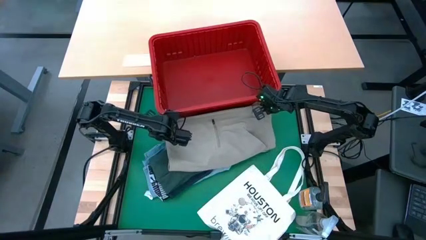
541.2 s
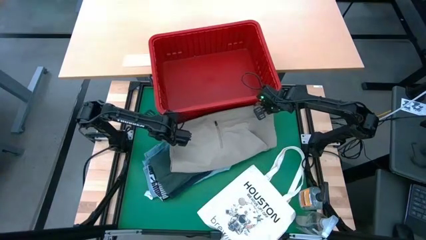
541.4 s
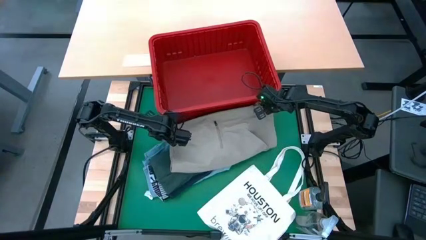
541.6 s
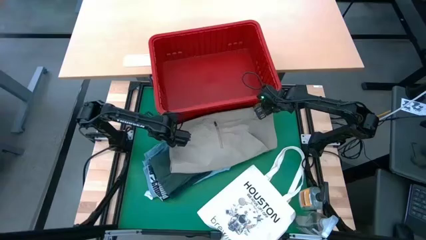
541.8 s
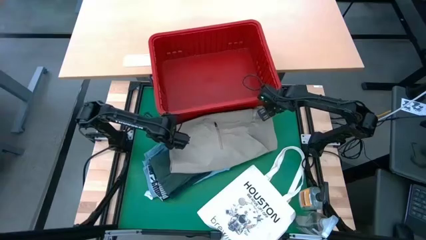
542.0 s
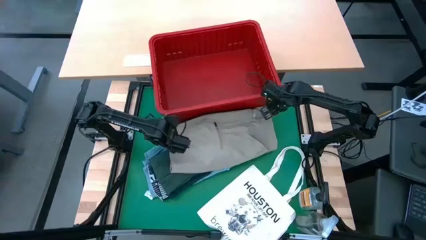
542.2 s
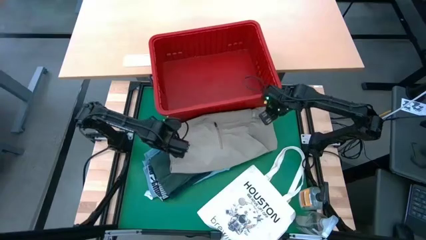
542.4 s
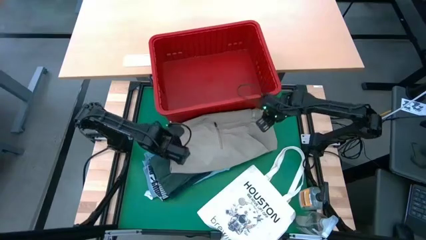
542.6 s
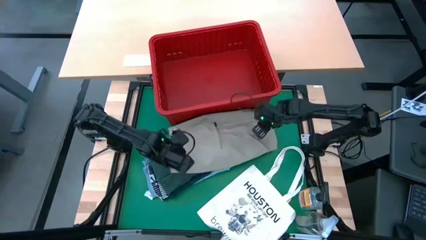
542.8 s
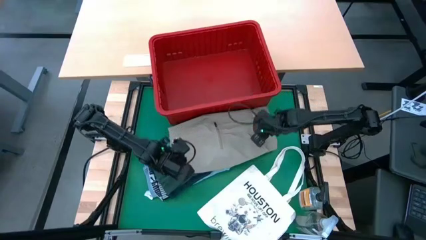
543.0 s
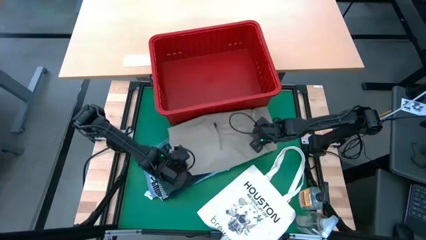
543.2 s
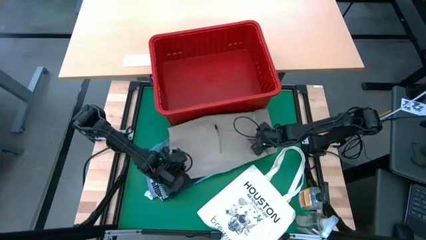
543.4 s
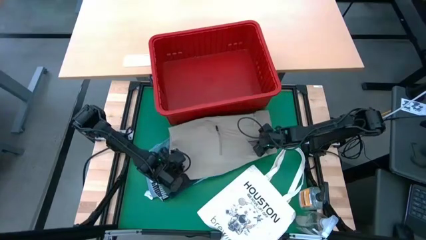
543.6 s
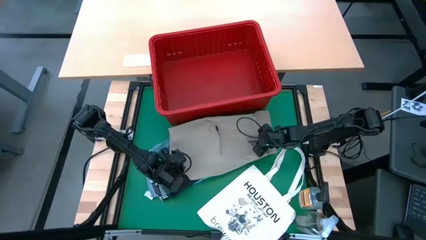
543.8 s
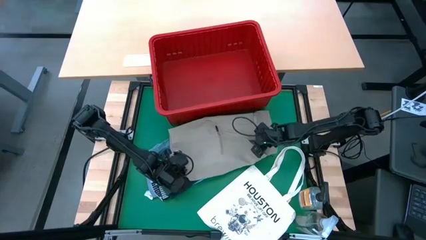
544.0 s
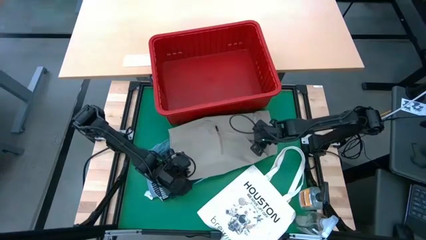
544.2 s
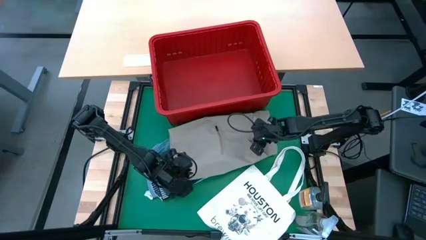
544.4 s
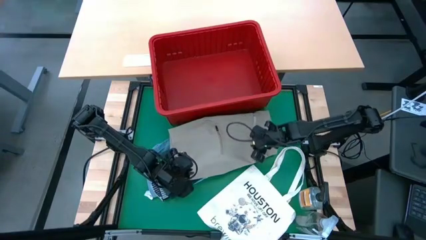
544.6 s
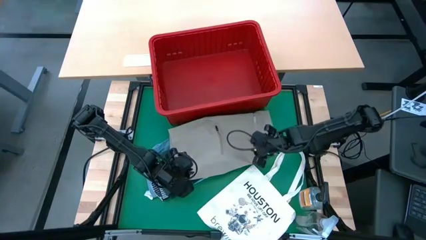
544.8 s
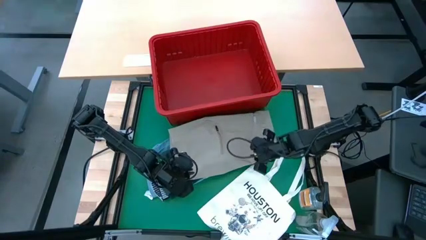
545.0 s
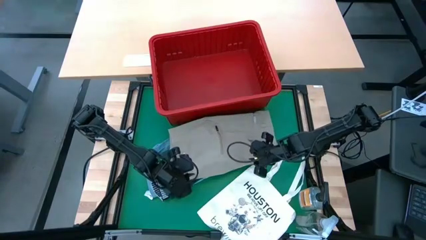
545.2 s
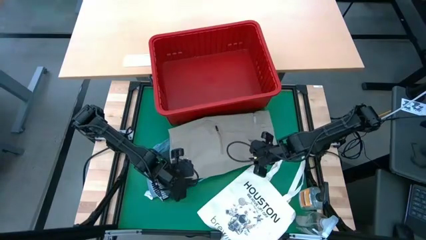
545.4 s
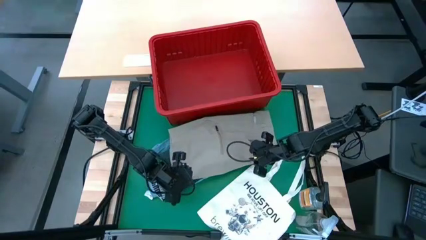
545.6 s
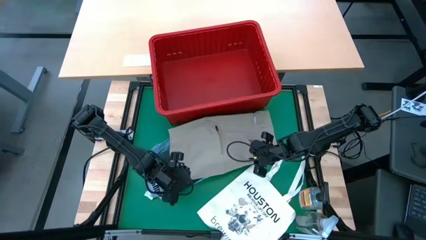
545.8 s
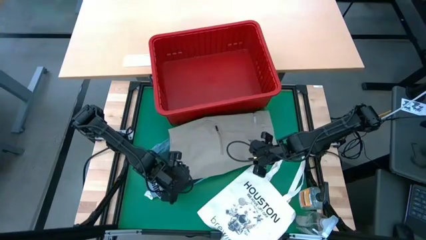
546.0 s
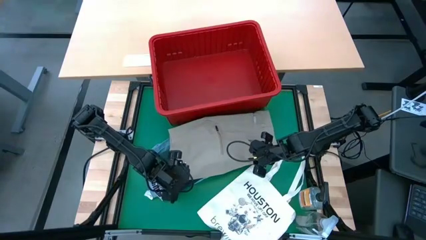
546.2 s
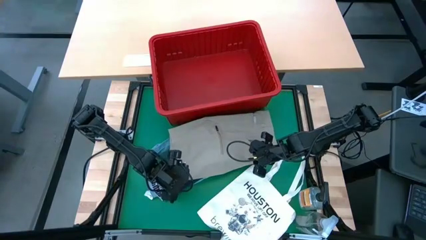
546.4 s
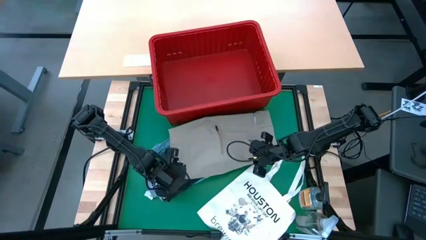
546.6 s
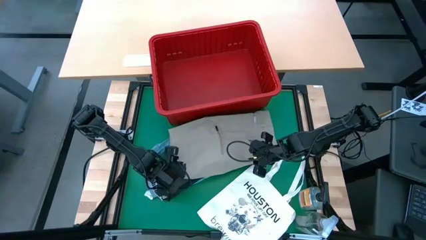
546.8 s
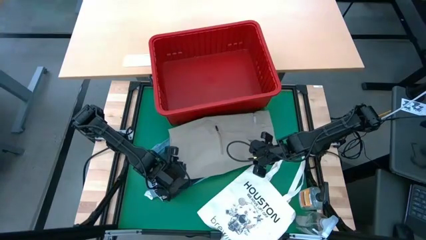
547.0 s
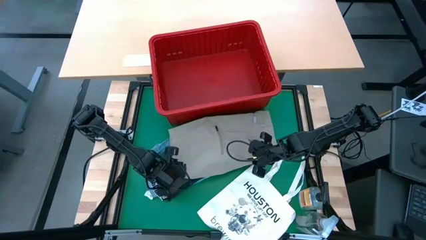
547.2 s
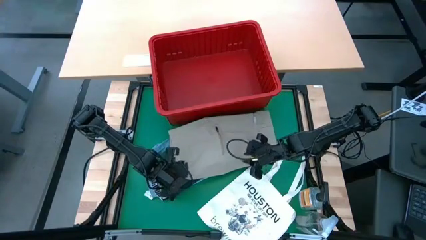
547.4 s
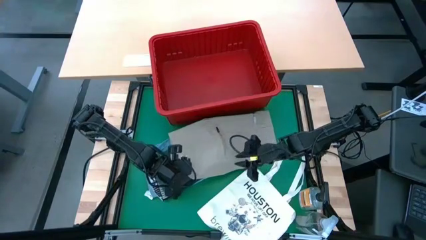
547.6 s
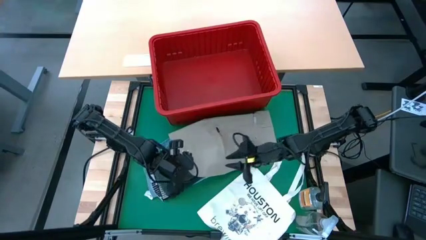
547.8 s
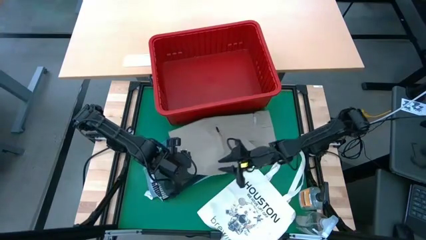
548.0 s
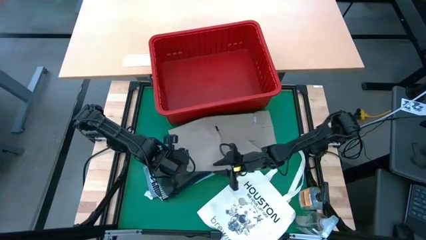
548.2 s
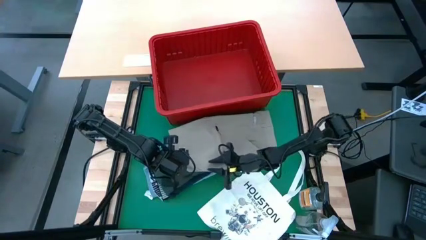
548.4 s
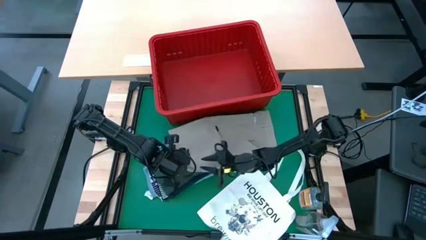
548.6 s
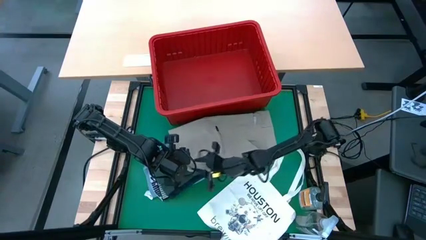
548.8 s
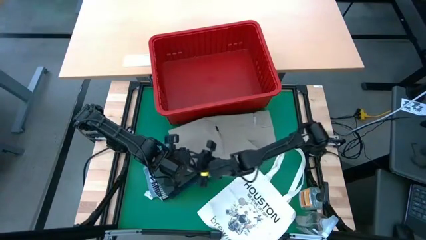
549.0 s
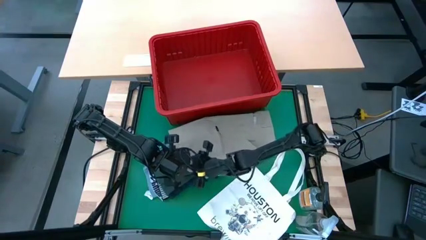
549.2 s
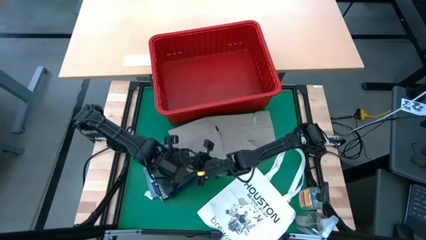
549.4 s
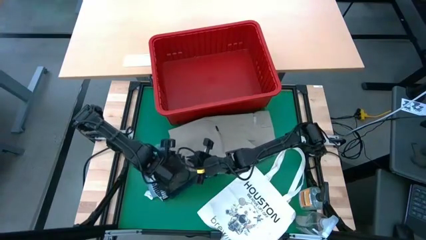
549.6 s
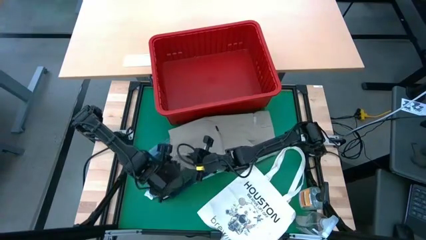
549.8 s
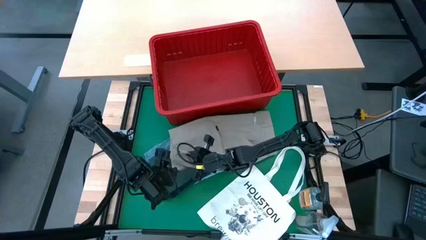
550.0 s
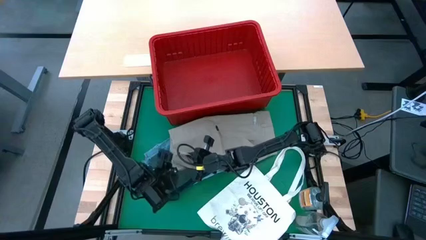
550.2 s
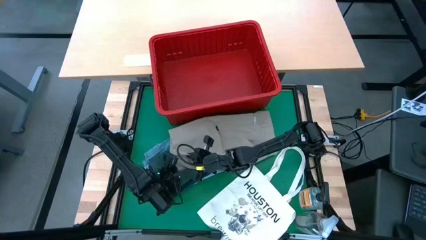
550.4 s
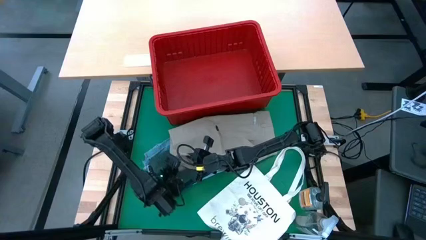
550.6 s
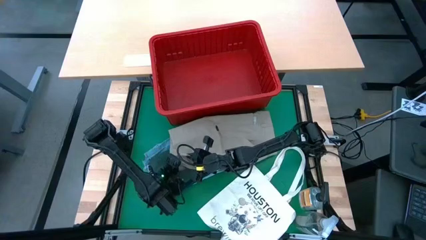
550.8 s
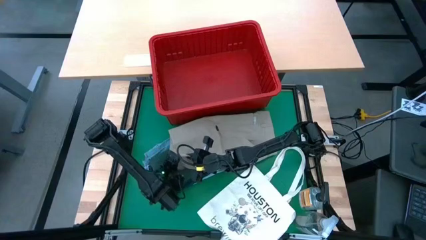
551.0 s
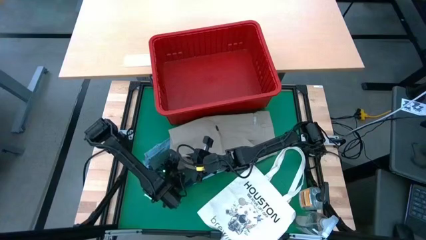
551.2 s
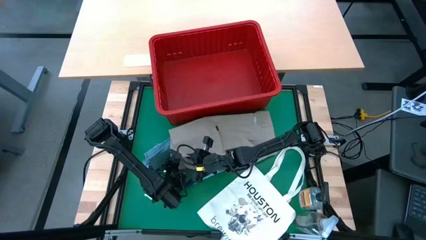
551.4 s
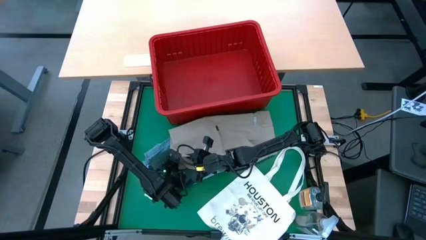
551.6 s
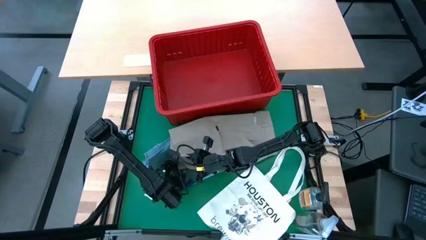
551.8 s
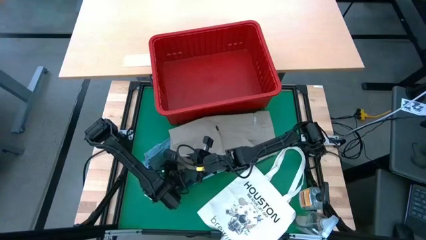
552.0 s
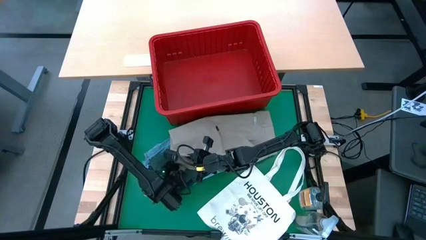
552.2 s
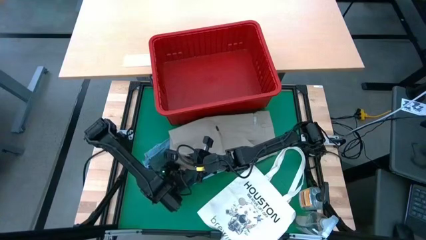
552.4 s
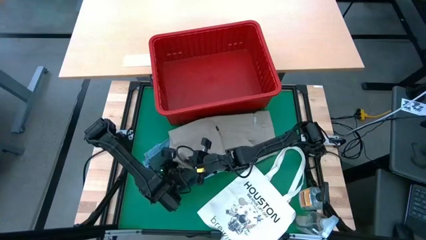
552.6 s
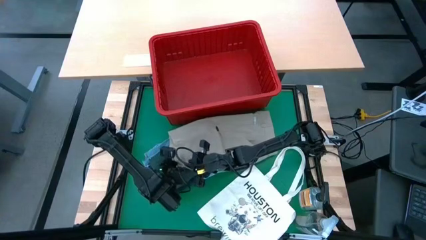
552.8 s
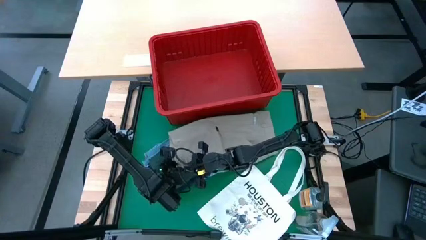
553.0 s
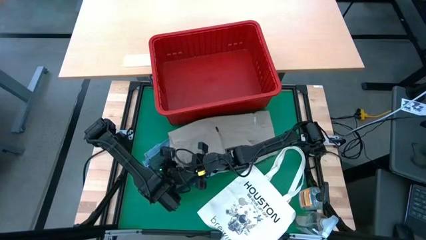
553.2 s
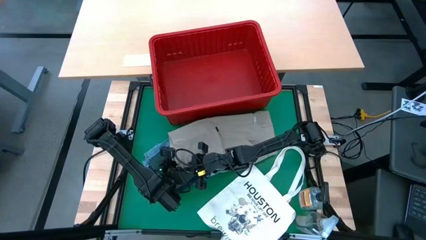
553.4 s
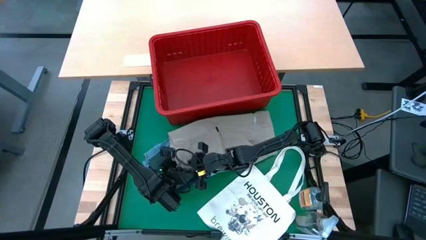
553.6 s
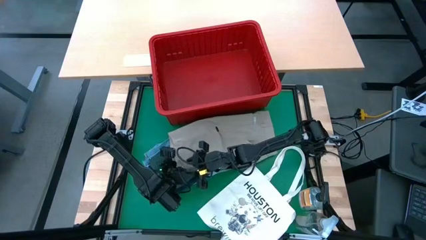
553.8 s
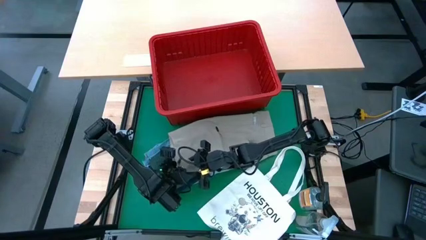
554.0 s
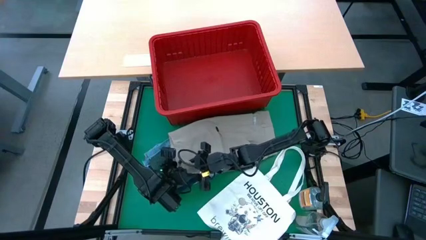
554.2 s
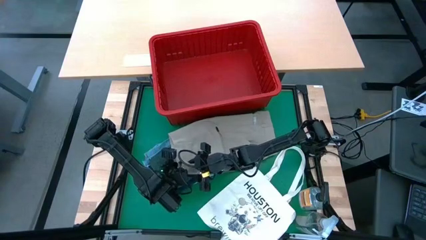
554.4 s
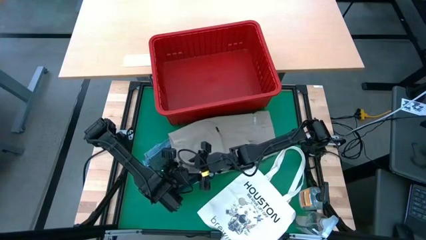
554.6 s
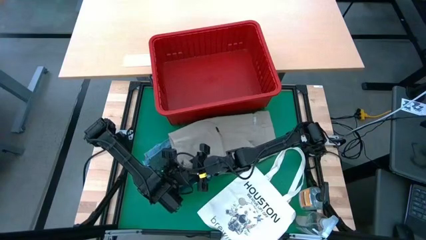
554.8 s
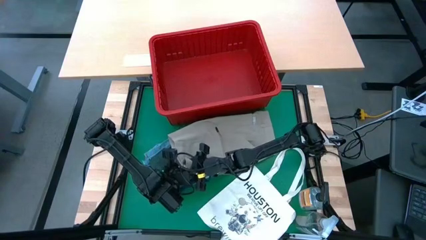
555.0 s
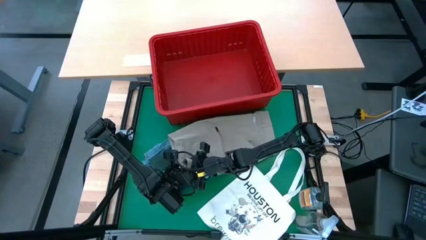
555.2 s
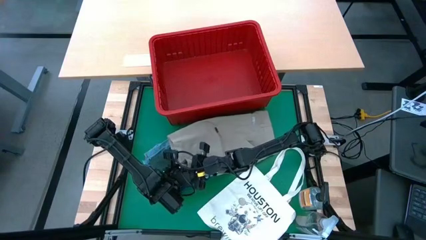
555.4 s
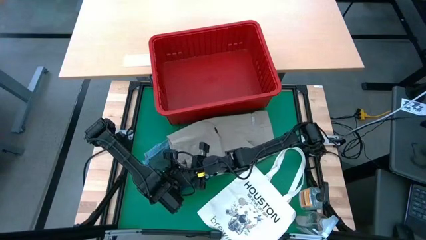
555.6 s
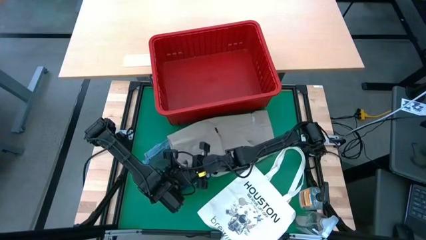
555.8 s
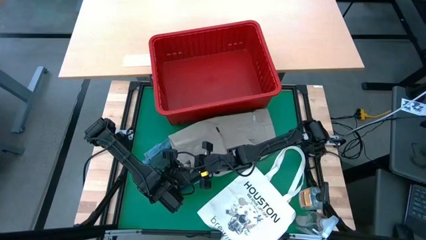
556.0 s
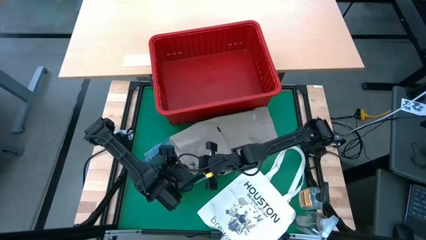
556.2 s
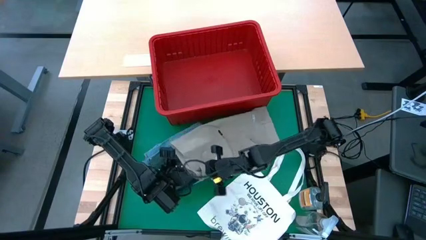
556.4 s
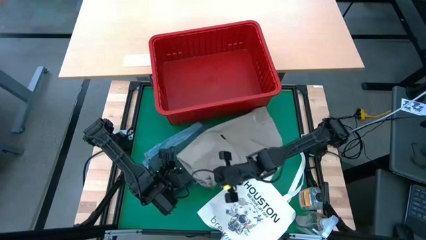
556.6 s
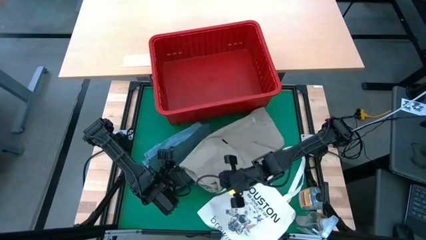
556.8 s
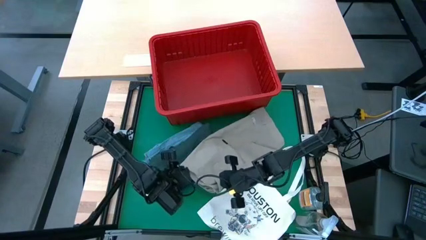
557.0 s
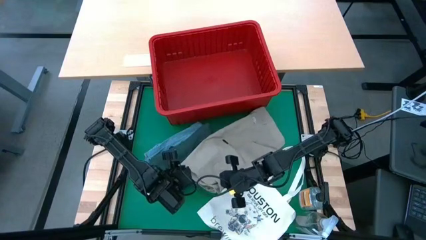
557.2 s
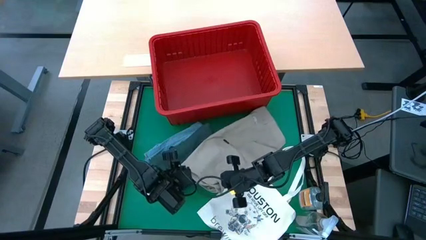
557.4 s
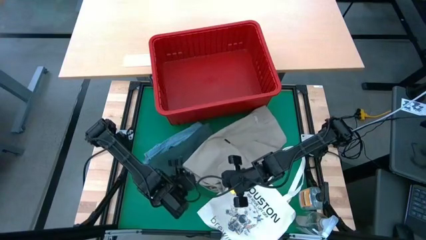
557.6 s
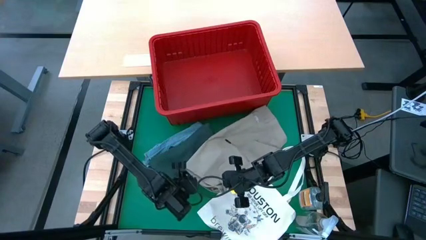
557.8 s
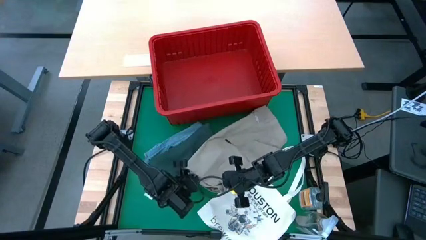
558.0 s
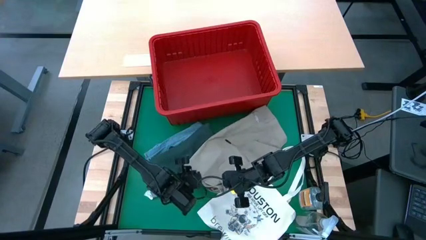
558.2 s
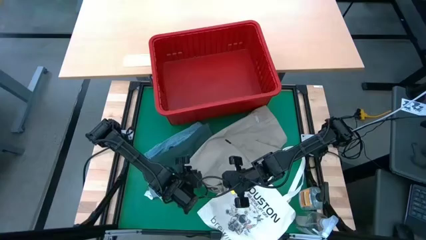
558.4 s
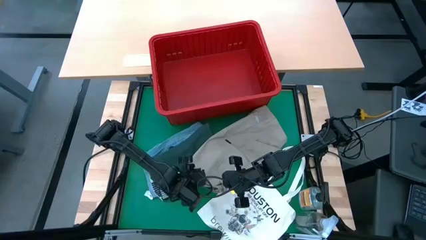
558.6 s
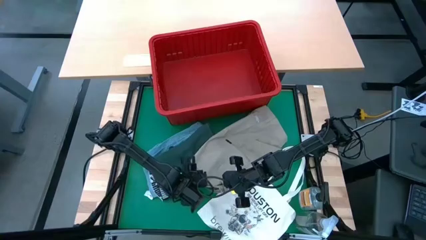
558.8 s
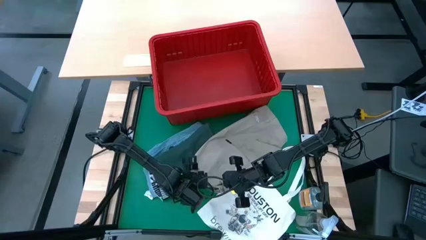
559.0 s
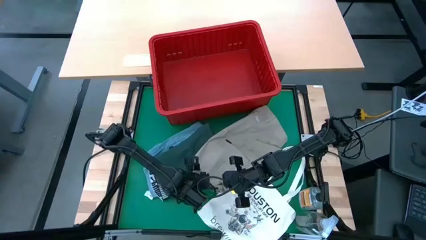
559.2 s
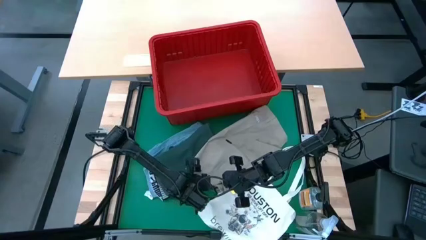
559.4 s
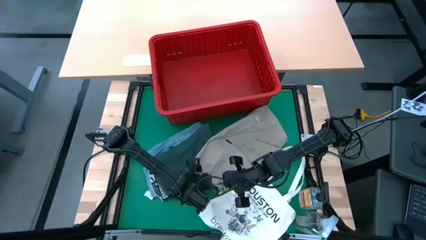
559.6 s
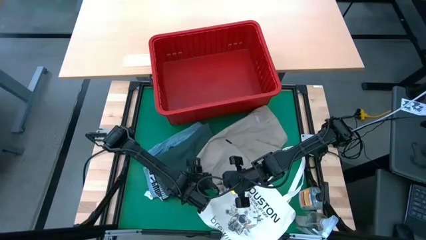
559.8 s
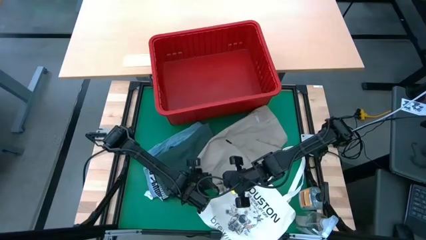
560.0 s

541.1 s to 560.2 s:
Task: Fold Laundry from Bin
Fold the light brown shorts
